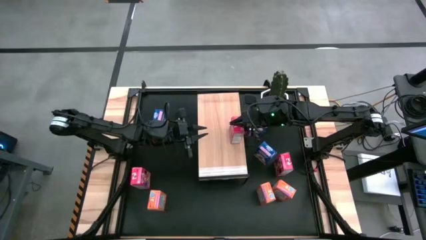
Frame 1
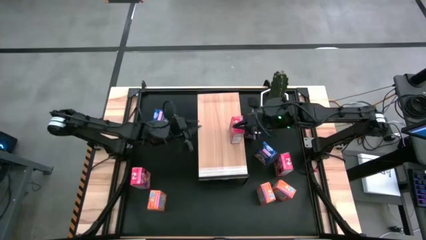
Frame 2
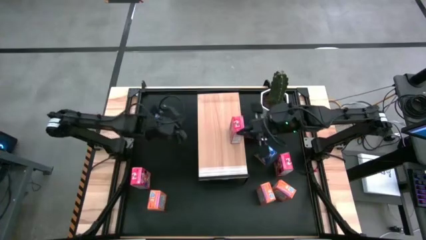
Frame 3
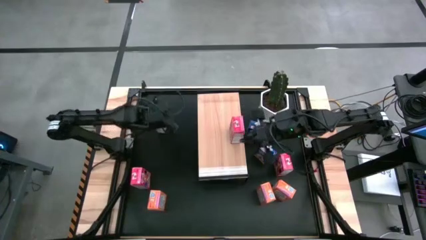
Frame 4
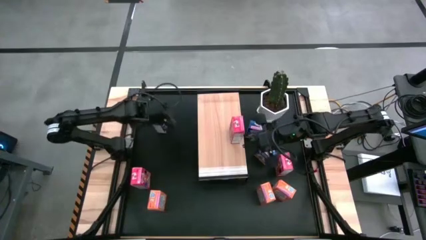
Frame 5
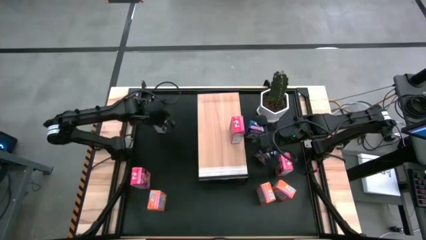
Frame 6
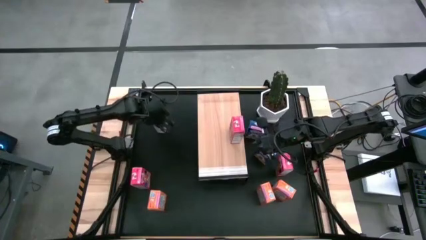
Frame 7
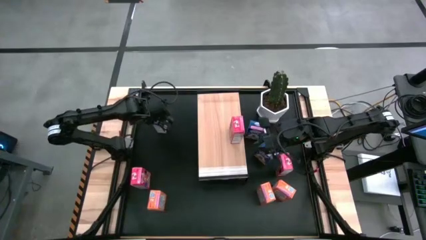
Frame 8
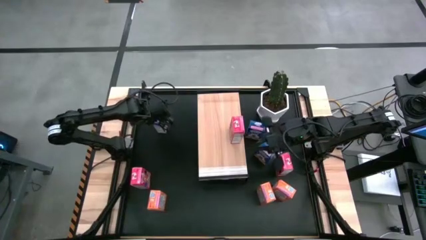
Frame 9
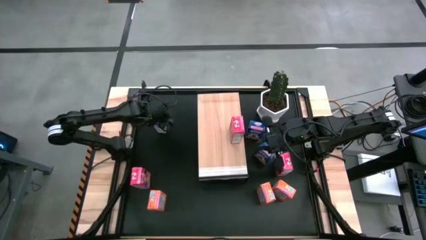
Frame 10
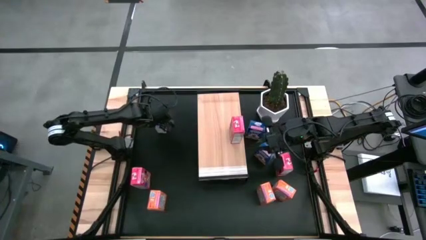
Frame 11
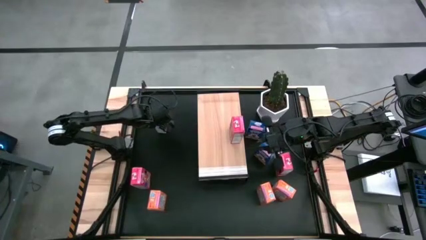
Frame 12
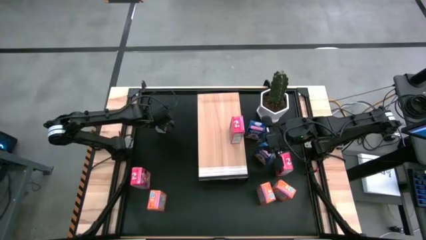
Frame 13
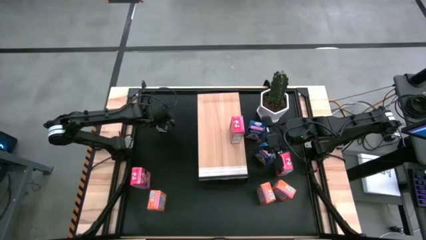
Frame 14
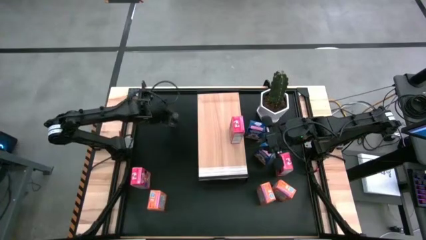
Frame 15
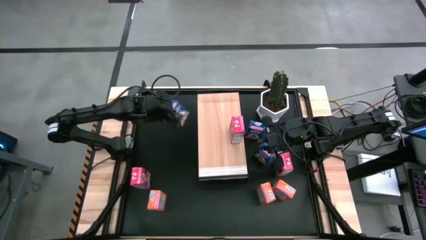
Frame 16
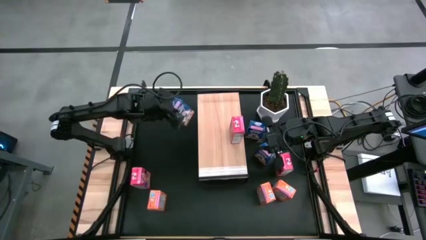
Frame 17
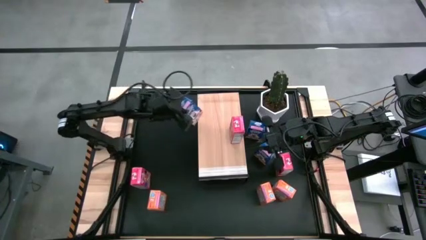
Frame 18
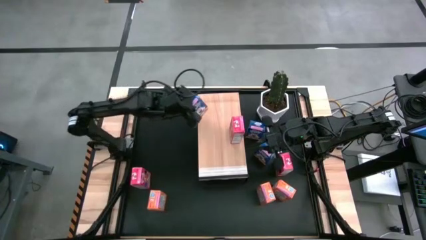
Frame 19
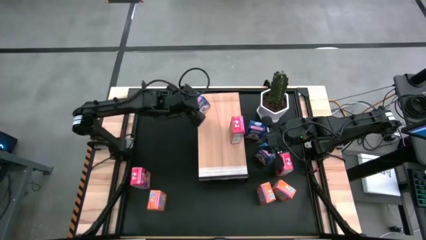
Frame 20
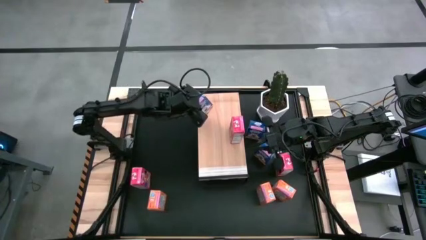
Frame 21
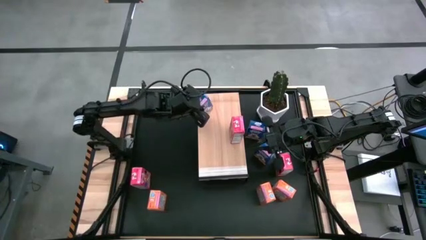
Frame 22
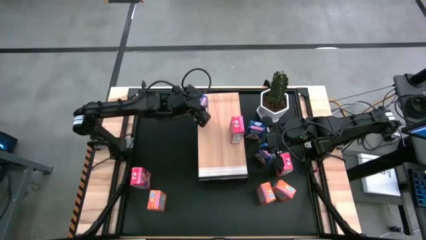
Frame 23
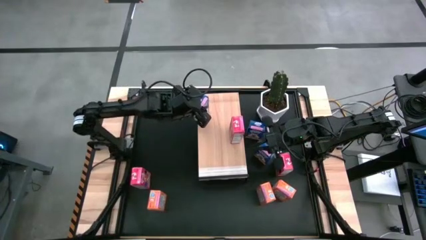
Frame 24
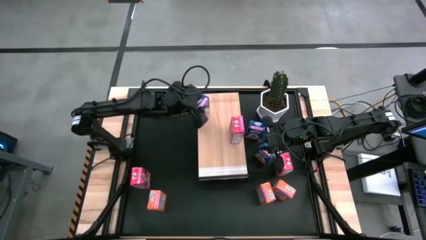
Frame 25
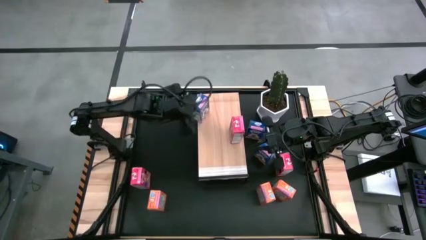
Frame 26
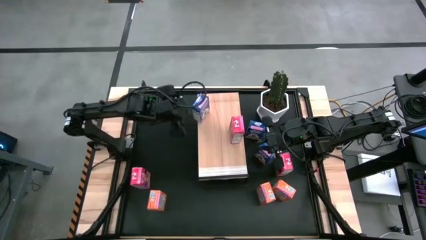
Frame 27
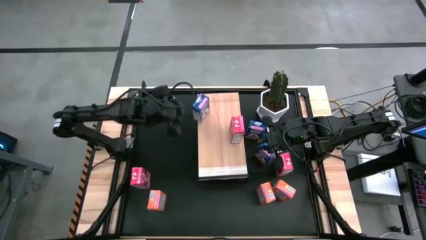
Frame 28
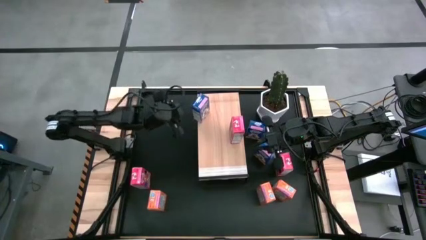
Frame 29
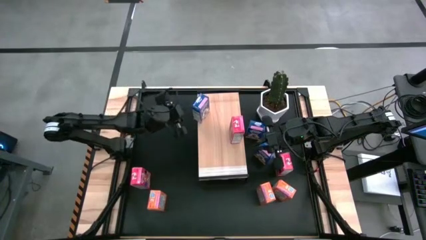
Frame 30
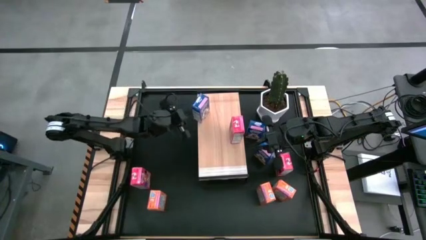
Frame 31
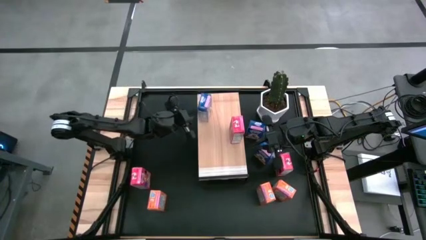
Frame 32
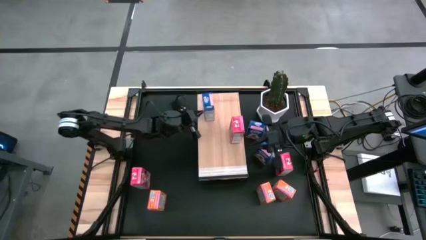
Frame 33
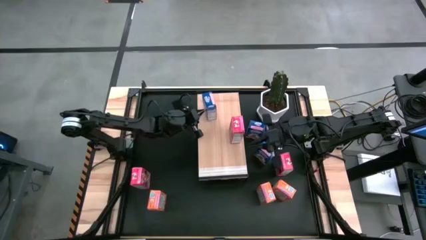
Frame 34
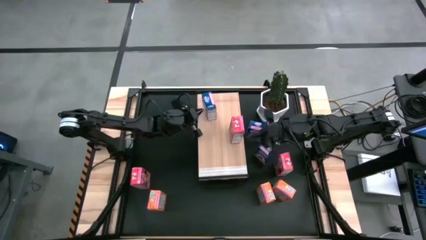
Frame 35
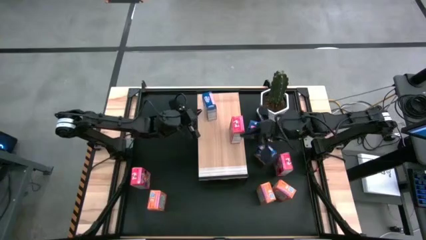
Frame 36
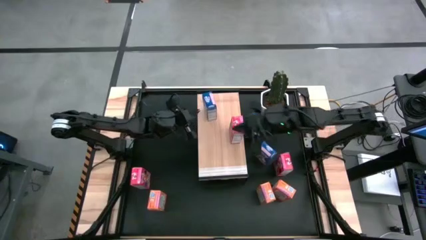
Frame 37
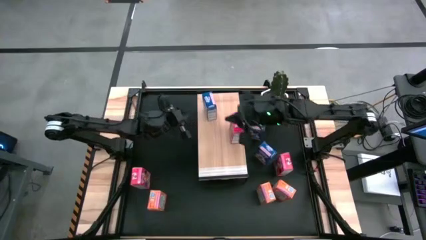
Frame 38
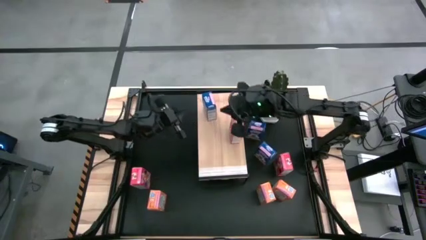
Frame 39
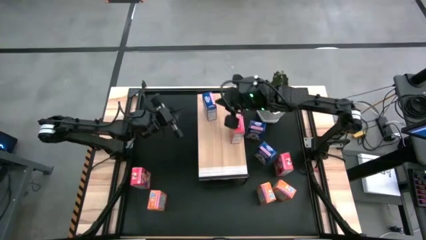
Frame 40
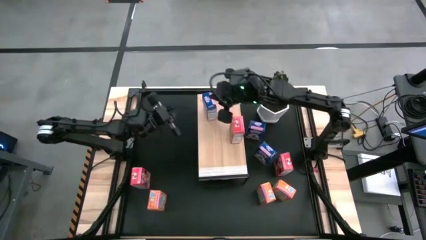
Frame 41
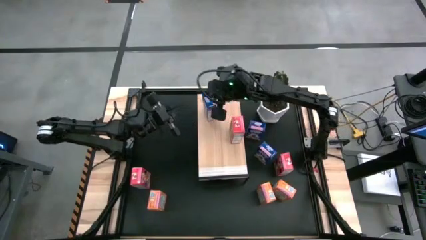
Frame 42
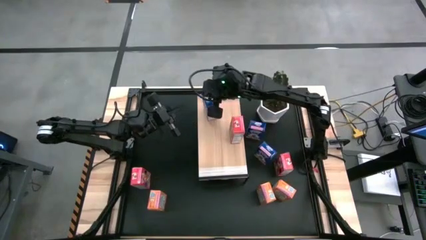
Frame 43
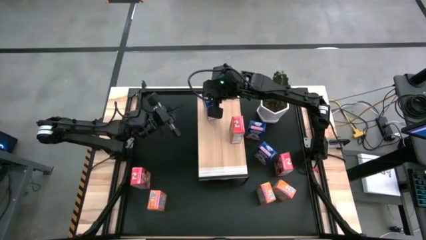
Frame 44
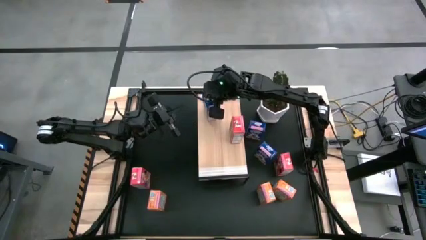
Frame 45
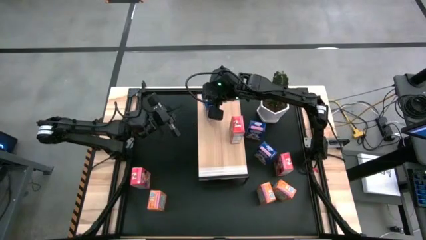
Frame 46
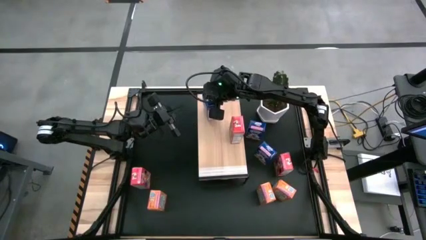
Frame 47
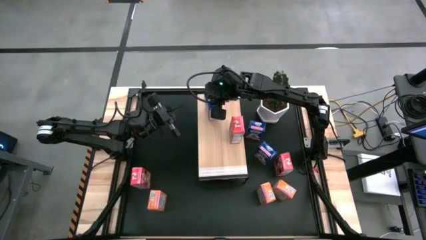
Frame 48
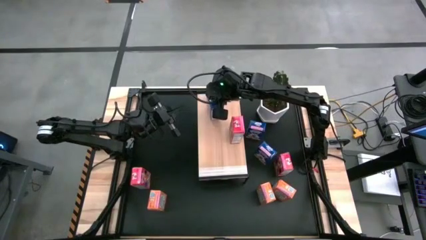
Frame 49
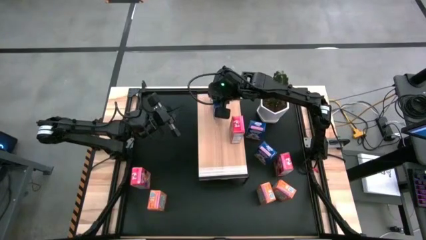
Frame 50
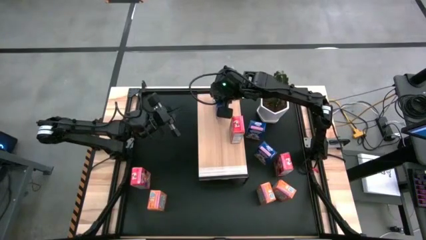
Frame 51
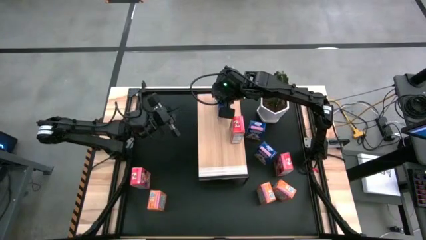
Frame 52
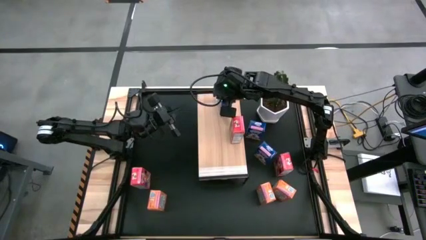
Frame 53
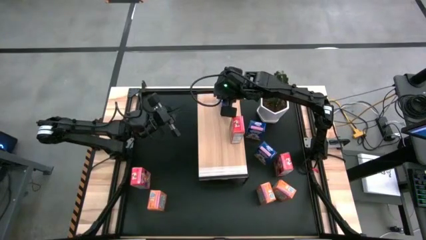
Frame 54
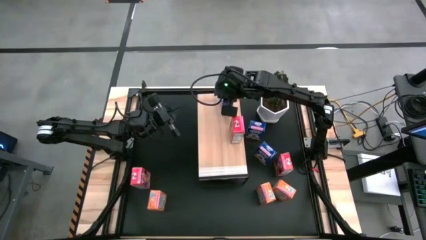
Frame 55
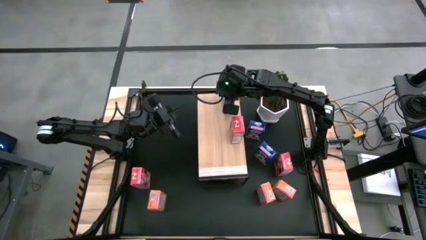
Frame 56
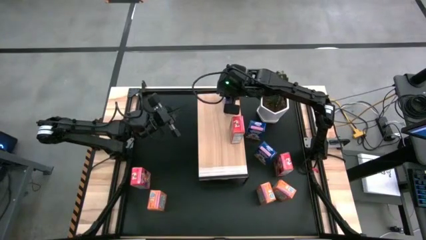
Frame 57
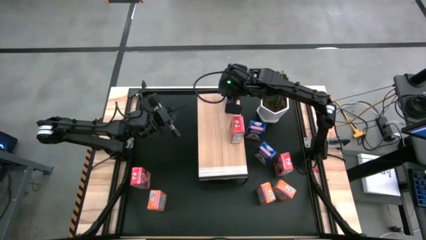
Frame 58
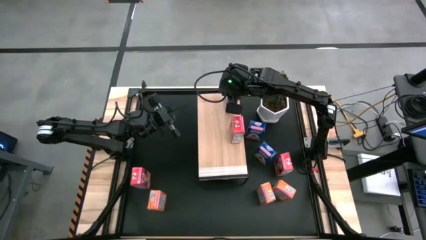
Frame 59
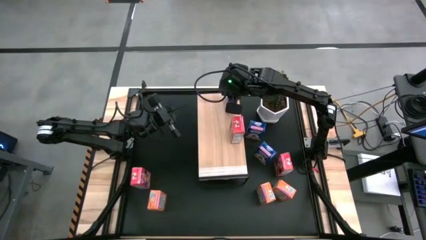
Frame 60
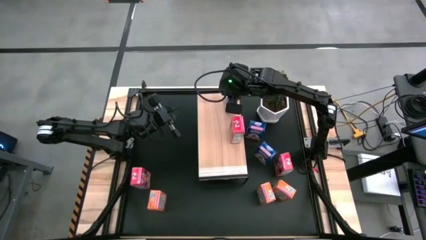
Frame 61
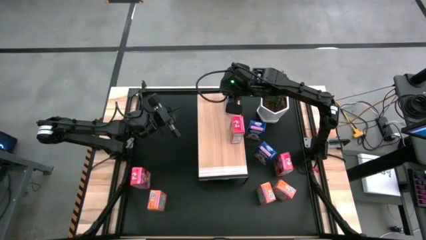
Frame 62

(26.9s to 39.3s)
Task: Stack cereal on shelf
Put the top left blue cereal box on the shelf
